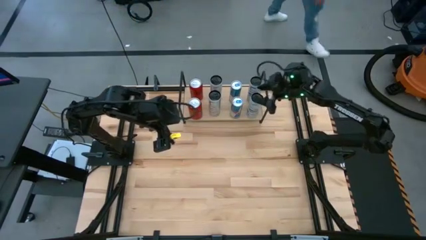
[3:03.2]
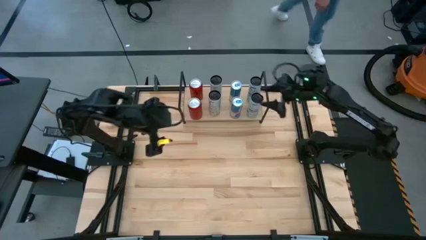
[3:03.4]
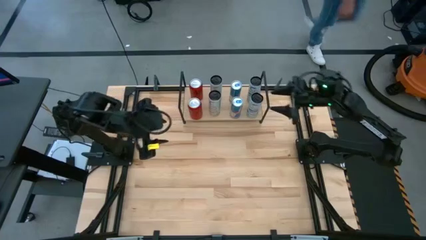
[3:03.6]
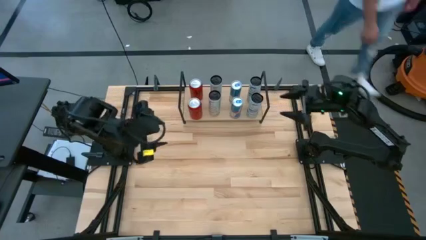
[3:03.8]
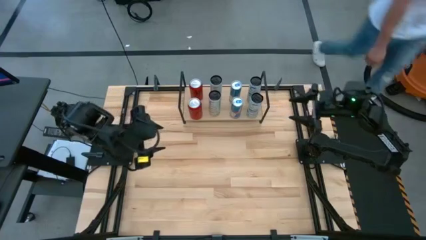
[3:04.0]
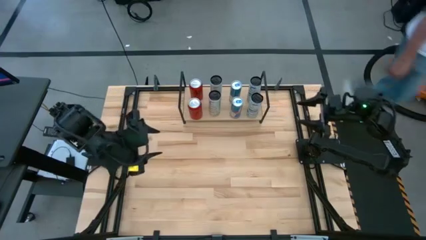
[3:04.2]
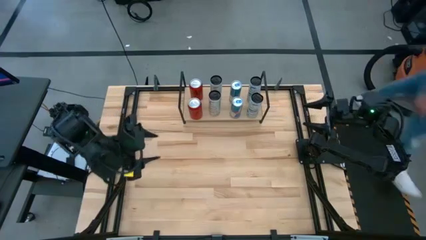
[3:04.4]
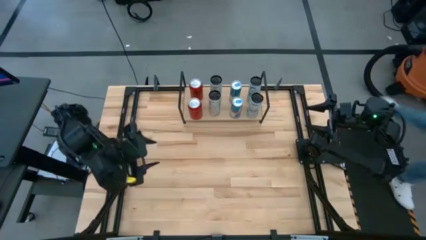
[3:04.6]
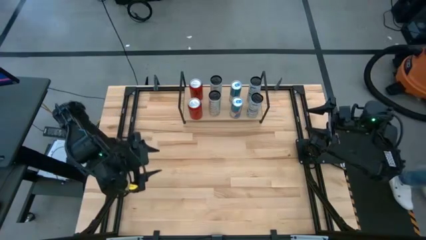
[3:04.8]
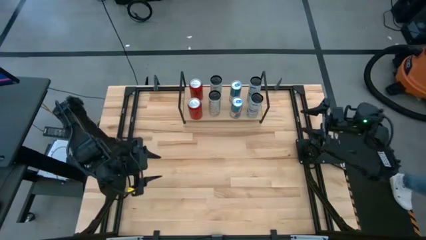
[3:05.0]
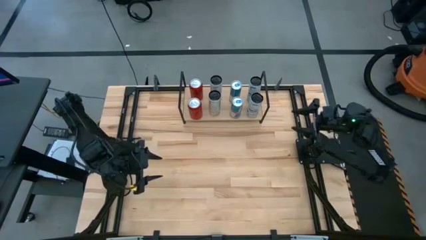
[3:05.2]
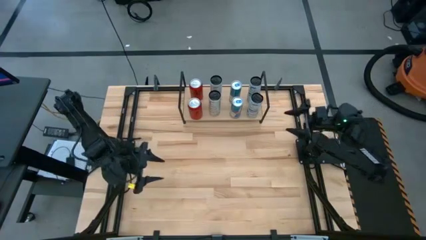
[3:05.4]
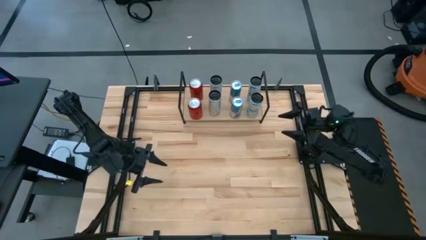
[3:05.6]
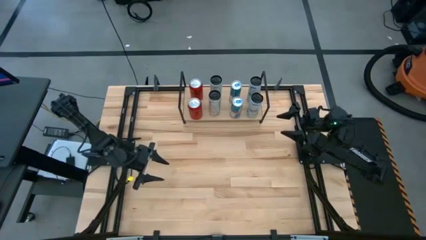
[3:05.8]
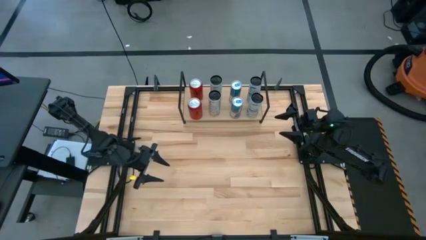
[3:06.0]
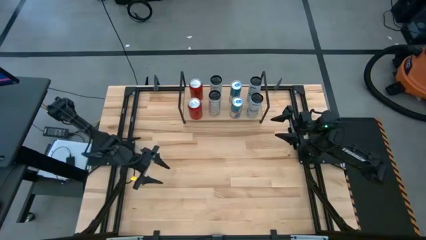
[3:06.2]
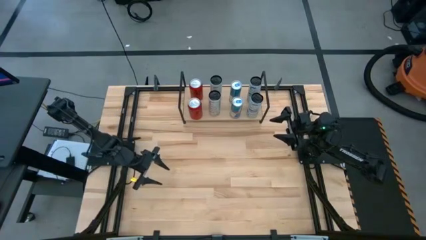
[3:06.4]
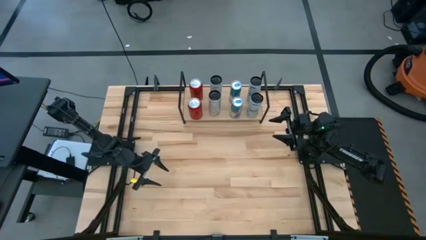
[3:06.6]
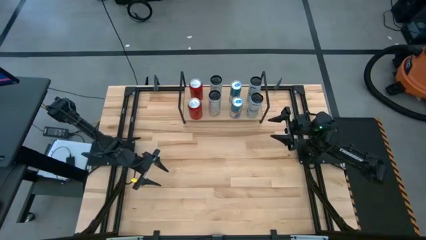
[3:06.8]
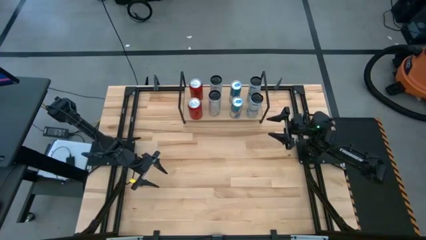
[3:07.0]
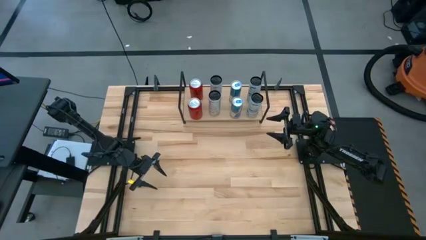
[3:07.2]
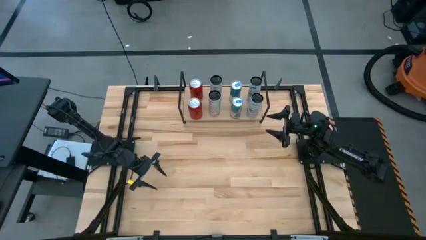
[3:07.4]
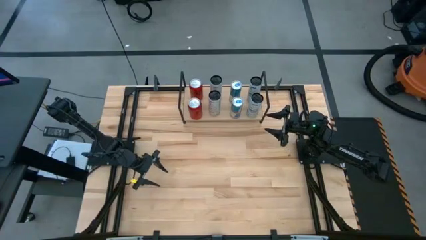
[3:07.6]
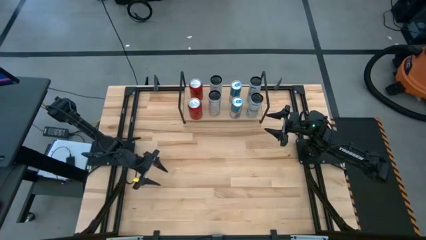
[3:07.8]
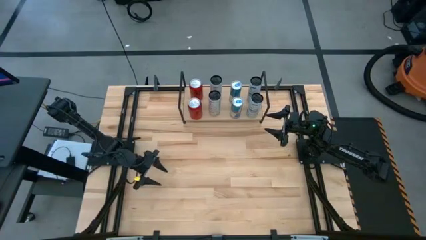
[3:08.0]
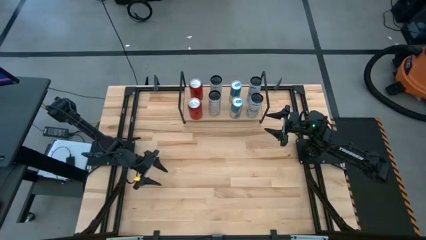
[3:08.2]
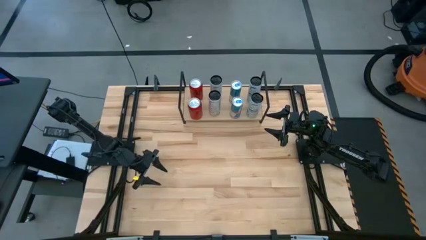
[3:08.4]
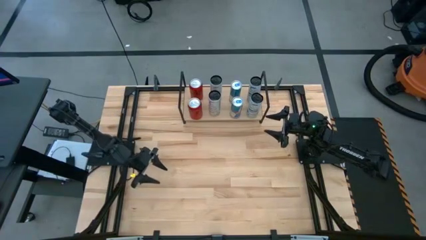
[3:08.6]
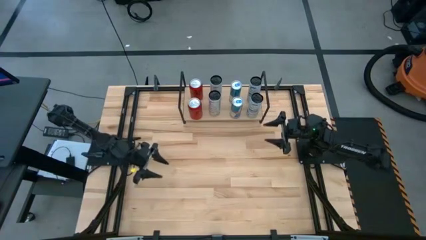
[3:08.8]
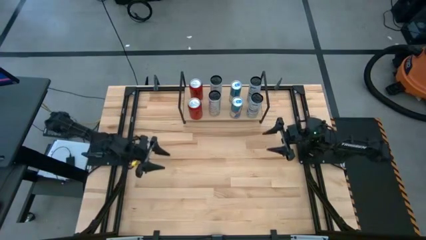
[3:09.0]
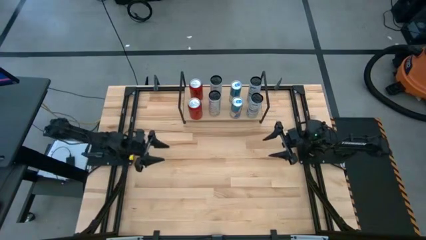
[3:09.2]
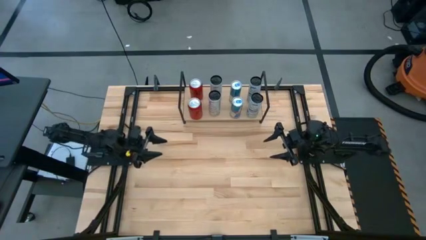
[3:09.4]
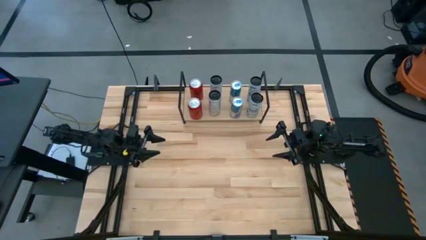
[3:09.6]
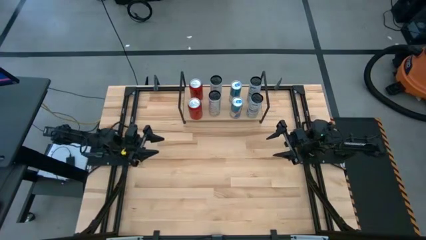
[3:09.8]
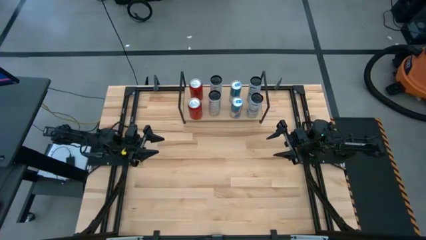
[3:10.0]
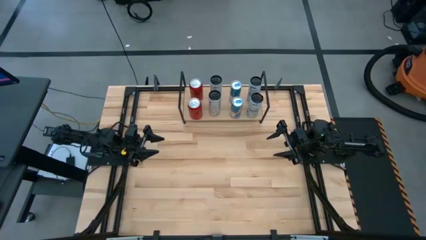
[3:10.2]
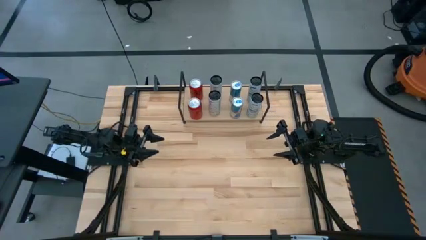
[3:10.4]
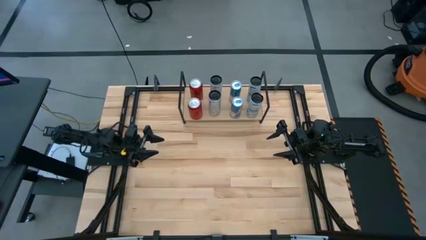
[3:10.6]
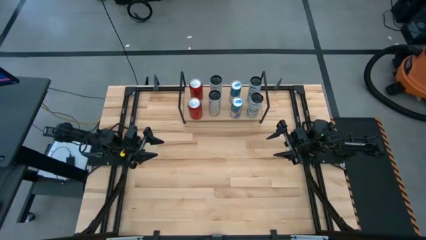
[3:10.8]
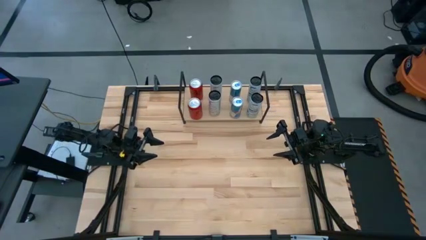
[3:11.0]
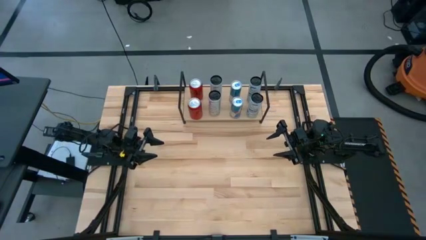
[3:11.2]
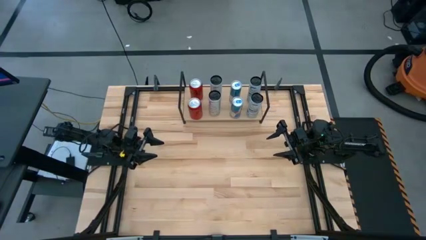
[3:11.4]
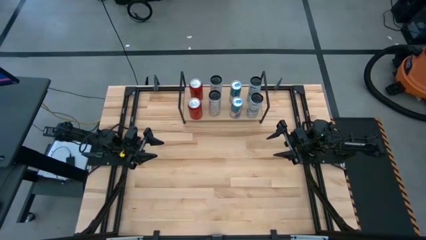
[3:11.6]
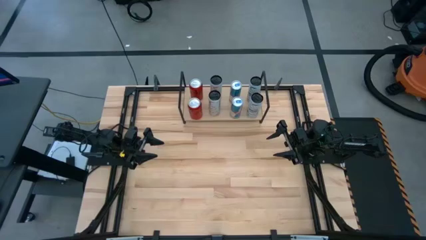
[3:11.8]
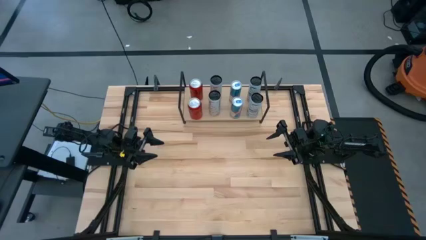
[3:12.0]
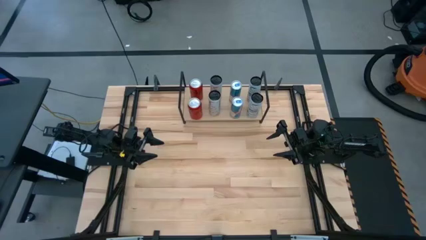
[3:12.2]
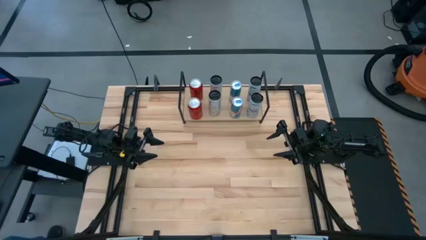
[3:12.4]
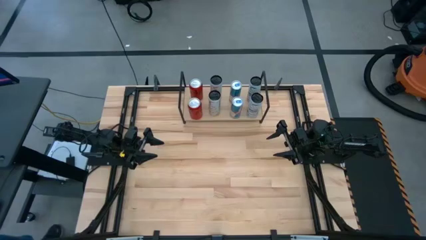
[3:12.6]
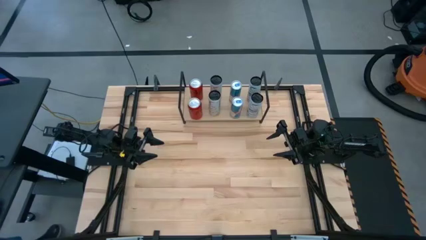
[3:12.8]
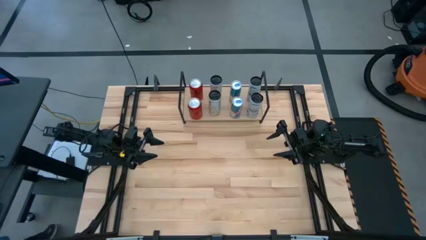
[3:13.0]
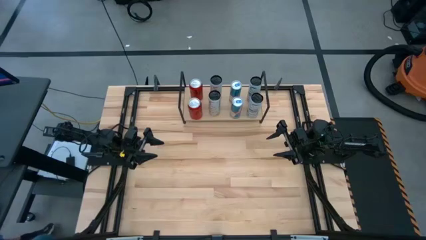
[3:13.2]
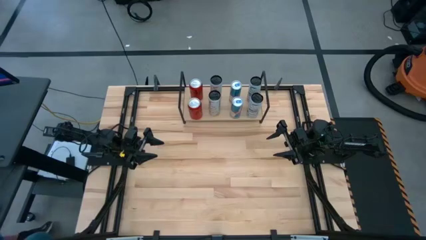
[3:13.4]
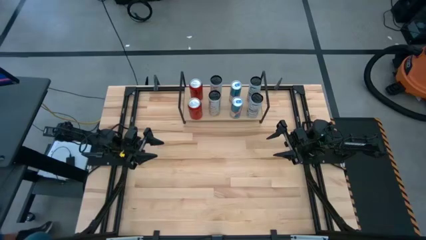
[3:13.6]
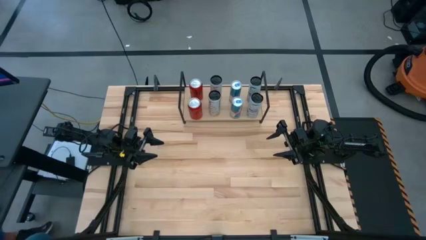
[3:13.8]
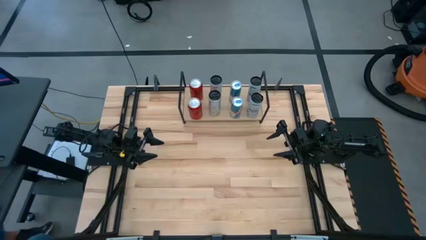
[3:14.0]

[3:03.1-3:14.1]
Task: Place canned beverage on shelf
Return to Home Position
